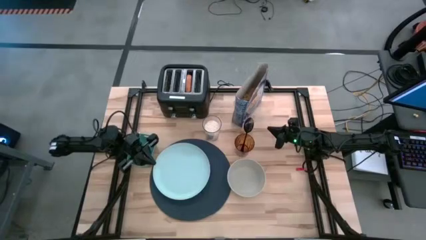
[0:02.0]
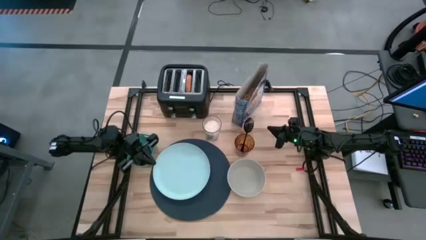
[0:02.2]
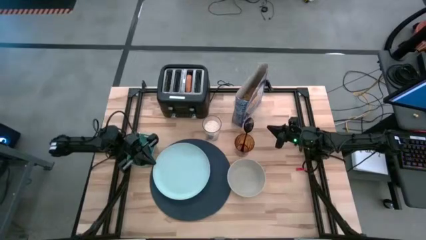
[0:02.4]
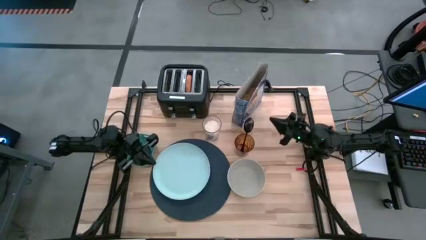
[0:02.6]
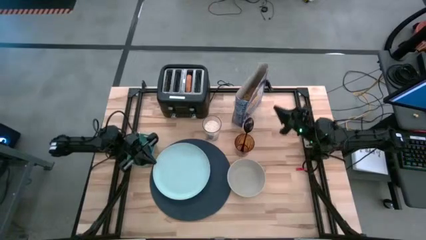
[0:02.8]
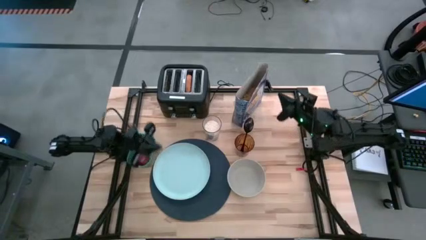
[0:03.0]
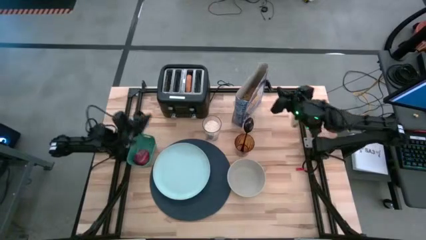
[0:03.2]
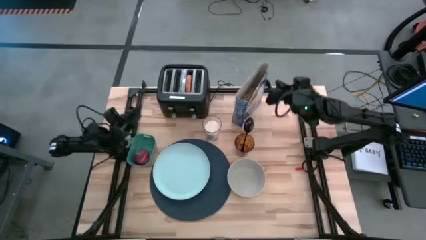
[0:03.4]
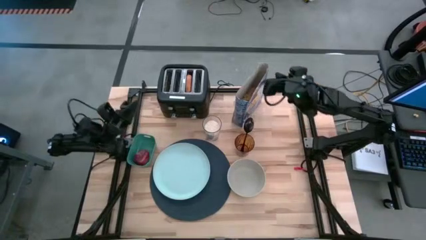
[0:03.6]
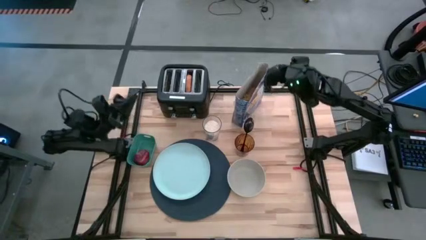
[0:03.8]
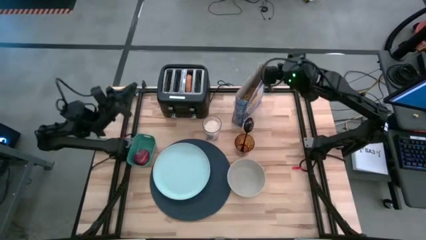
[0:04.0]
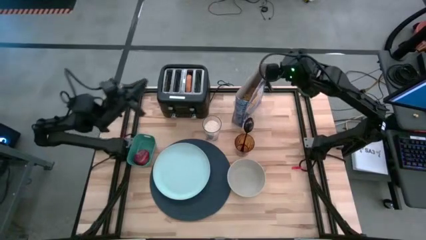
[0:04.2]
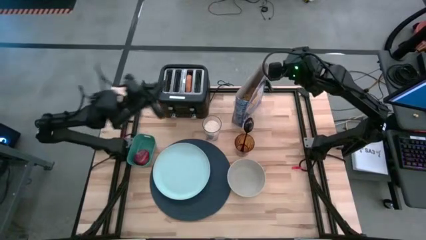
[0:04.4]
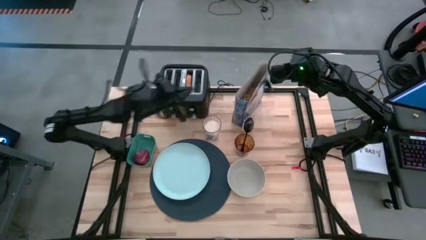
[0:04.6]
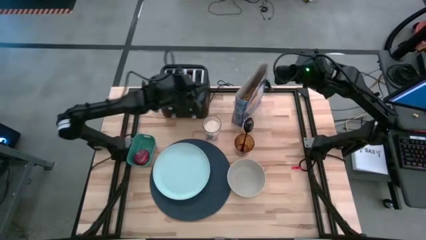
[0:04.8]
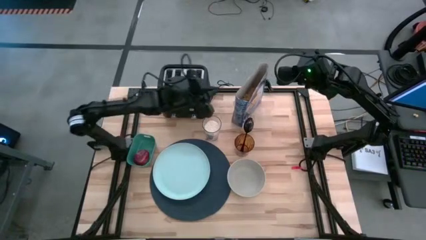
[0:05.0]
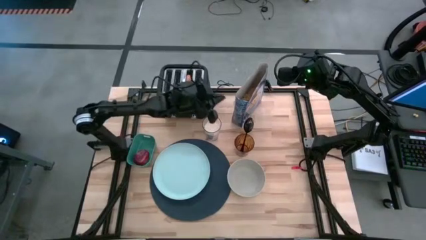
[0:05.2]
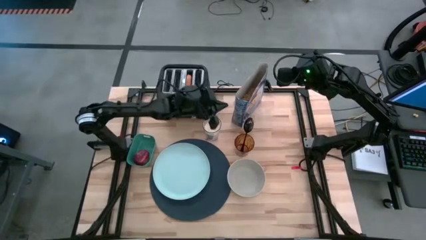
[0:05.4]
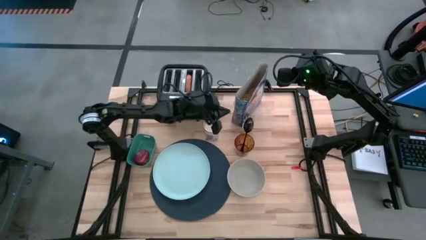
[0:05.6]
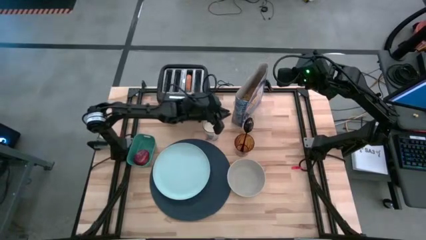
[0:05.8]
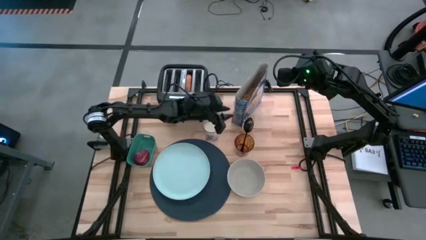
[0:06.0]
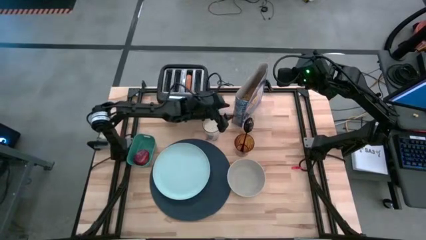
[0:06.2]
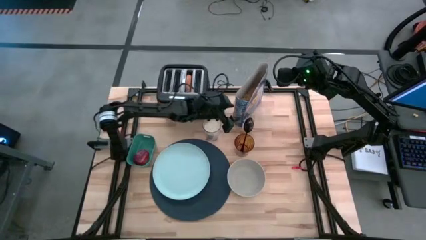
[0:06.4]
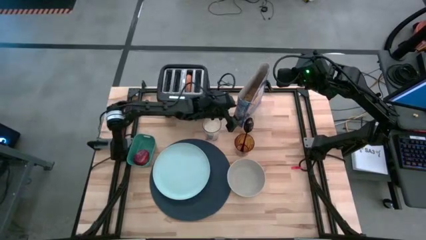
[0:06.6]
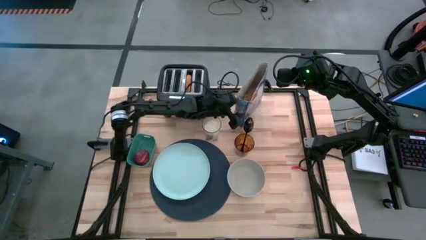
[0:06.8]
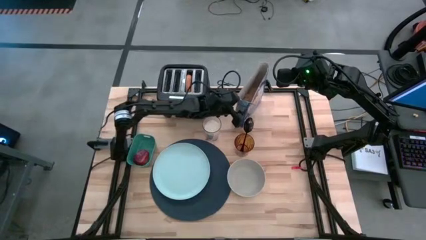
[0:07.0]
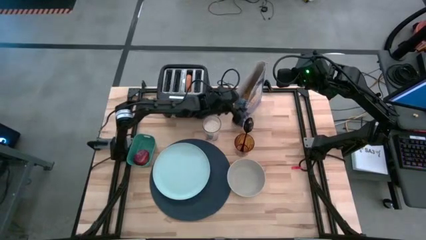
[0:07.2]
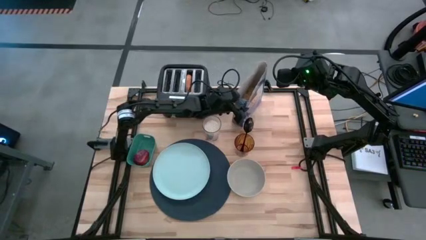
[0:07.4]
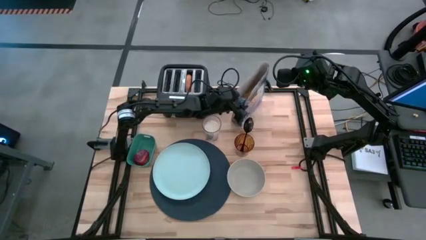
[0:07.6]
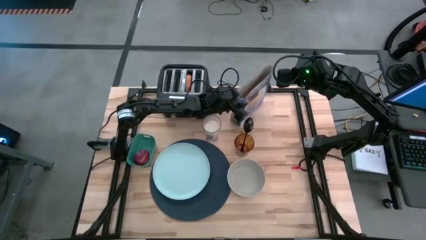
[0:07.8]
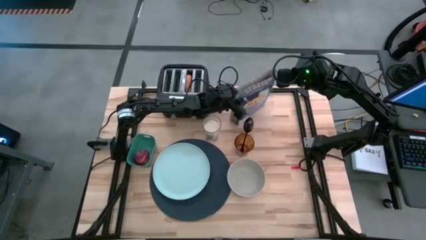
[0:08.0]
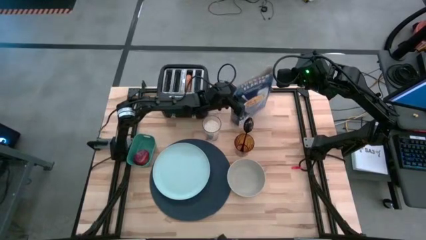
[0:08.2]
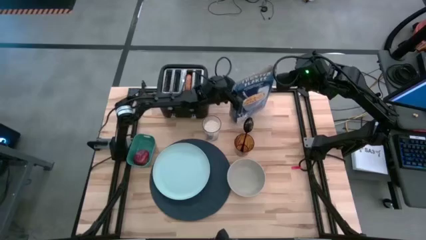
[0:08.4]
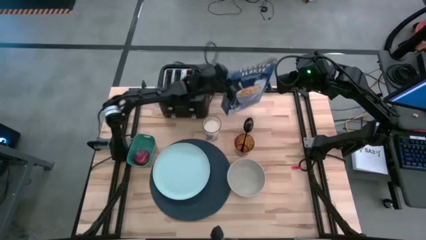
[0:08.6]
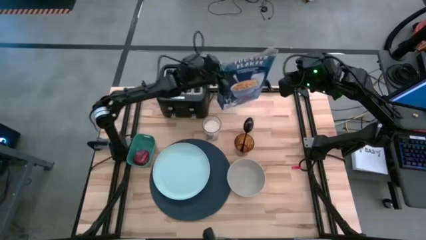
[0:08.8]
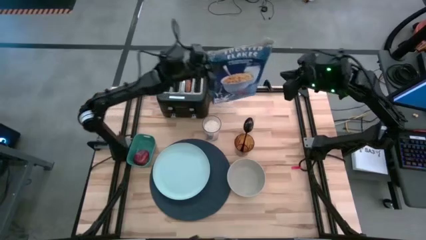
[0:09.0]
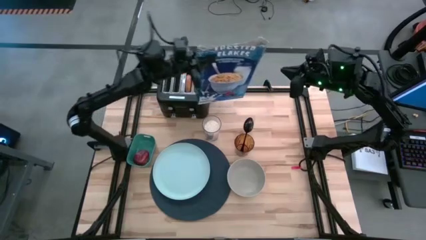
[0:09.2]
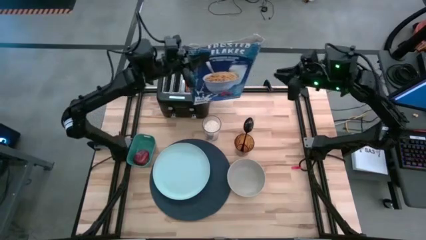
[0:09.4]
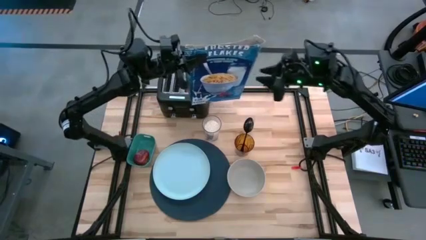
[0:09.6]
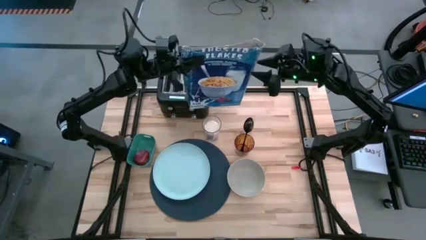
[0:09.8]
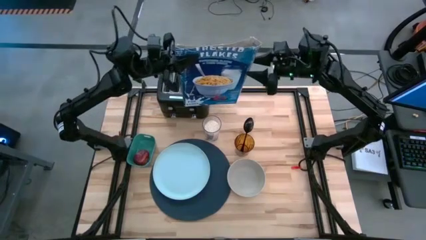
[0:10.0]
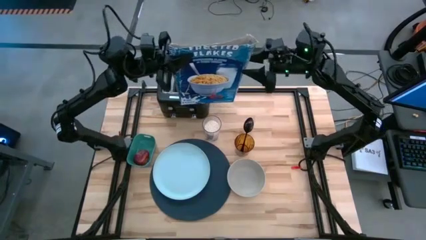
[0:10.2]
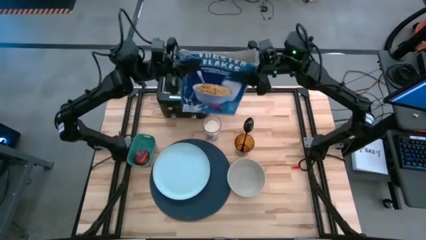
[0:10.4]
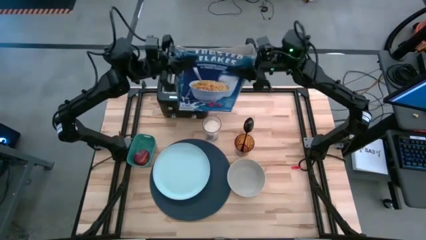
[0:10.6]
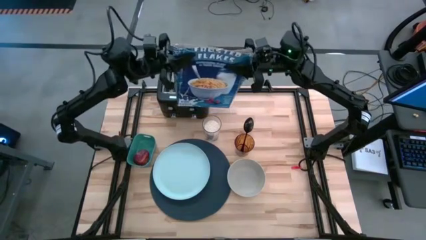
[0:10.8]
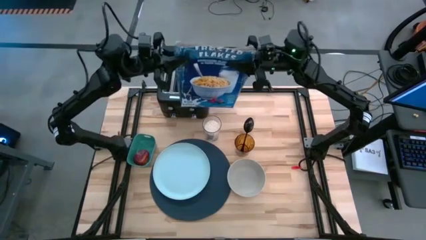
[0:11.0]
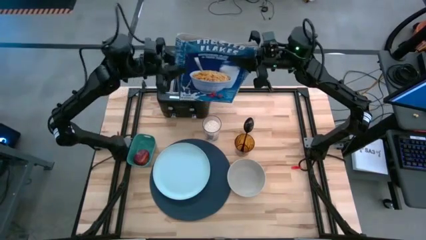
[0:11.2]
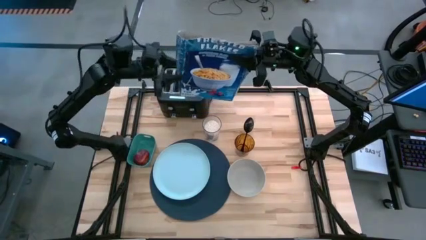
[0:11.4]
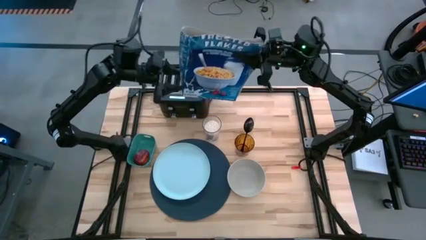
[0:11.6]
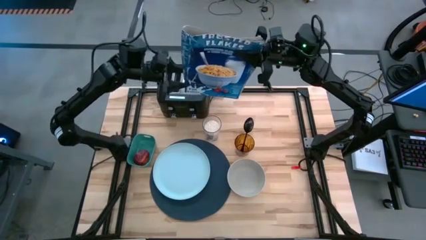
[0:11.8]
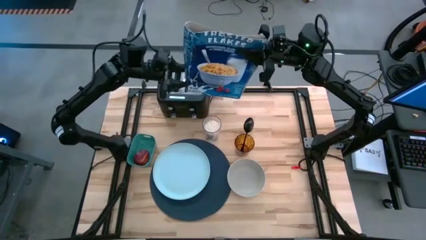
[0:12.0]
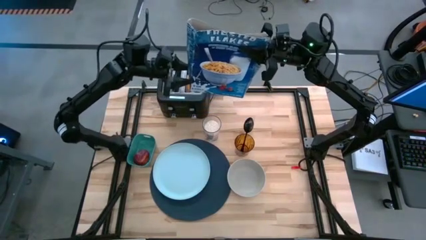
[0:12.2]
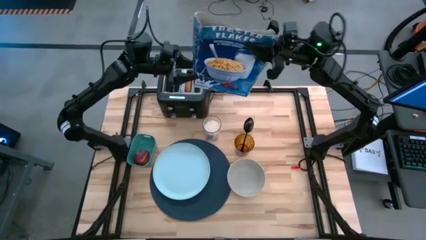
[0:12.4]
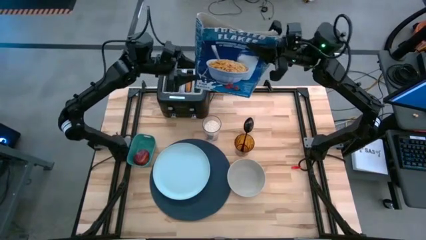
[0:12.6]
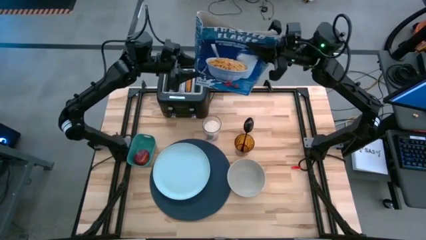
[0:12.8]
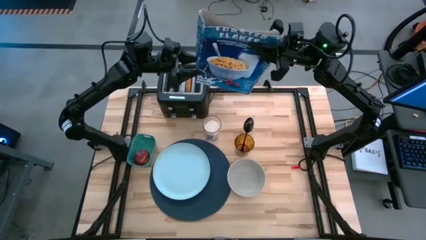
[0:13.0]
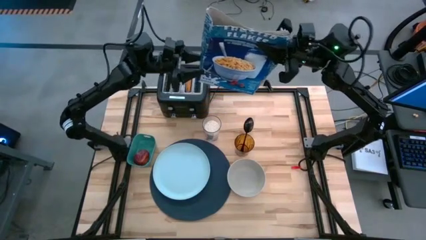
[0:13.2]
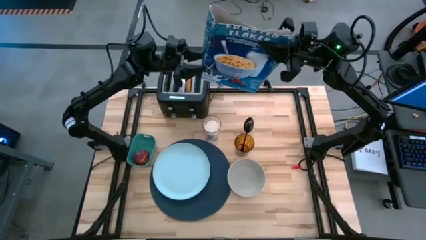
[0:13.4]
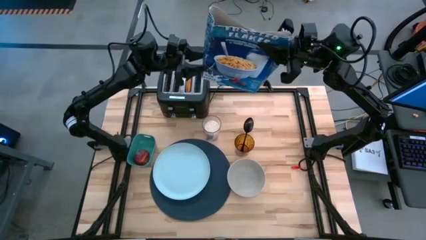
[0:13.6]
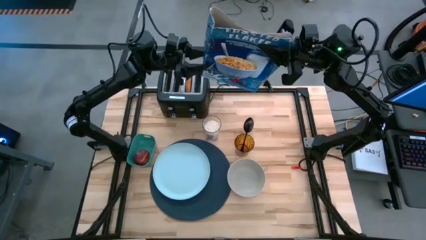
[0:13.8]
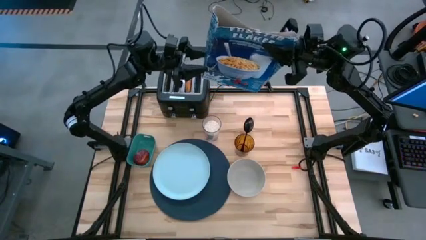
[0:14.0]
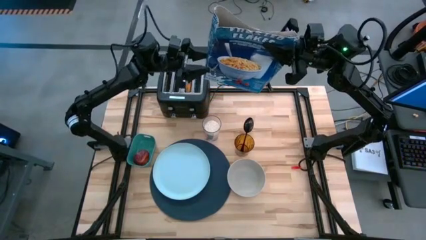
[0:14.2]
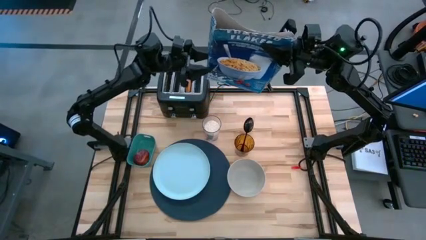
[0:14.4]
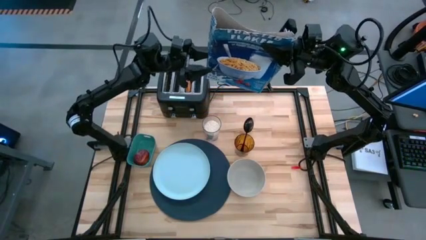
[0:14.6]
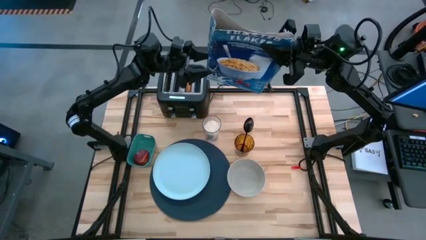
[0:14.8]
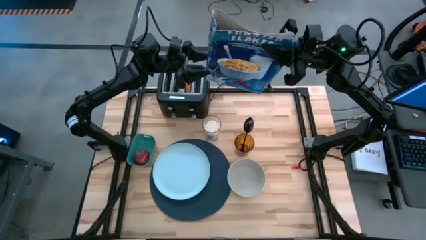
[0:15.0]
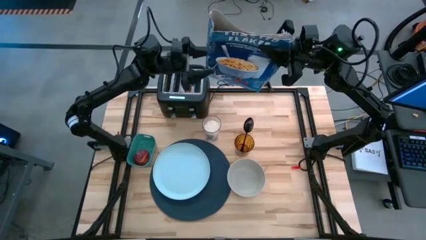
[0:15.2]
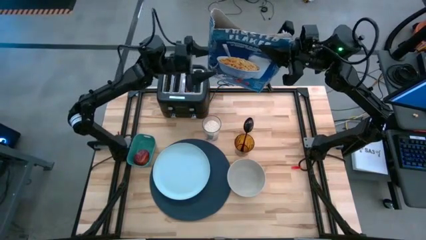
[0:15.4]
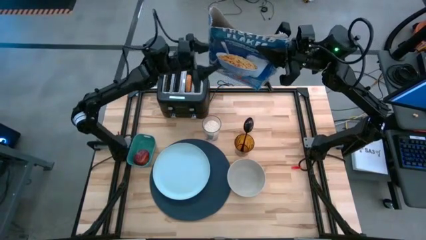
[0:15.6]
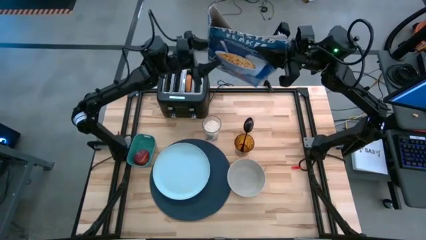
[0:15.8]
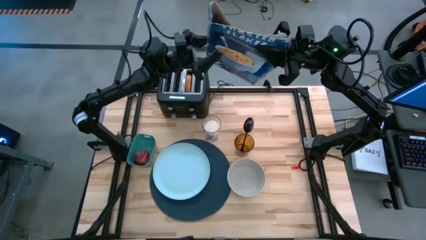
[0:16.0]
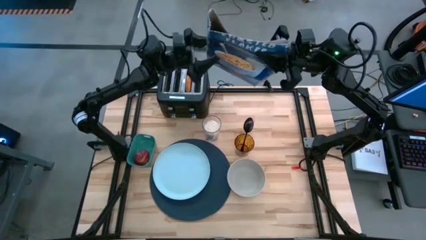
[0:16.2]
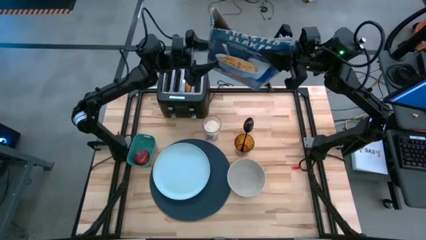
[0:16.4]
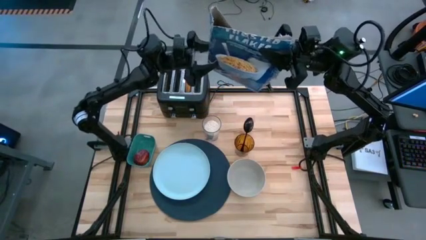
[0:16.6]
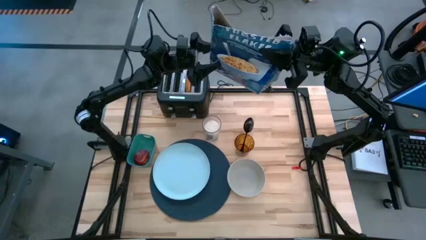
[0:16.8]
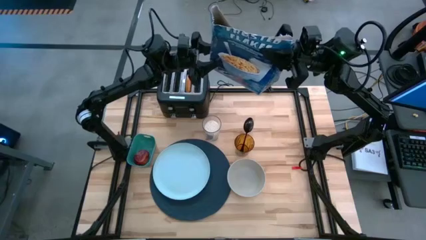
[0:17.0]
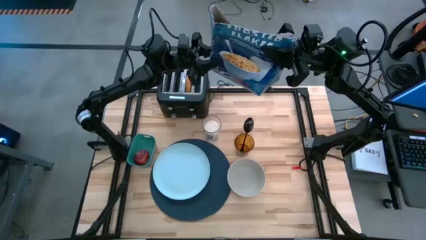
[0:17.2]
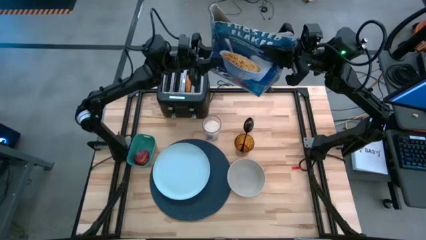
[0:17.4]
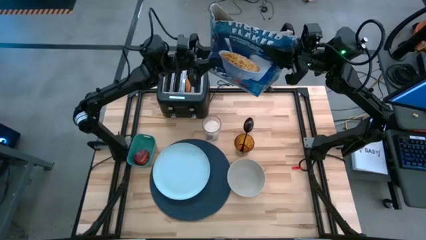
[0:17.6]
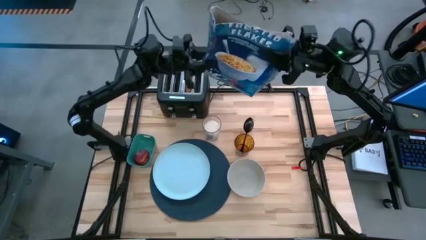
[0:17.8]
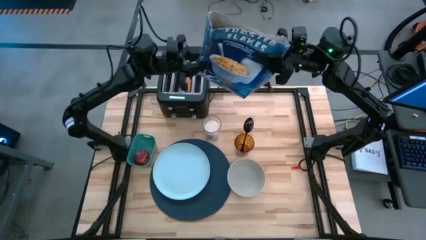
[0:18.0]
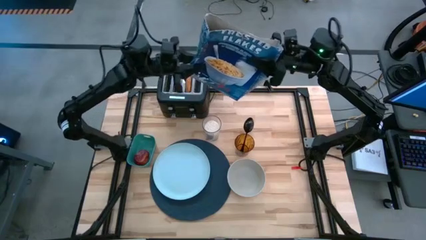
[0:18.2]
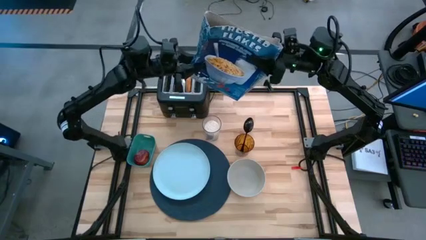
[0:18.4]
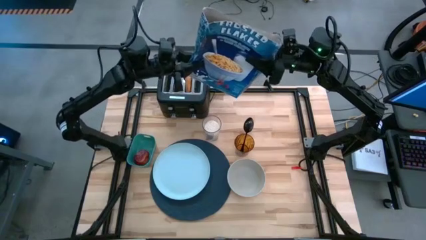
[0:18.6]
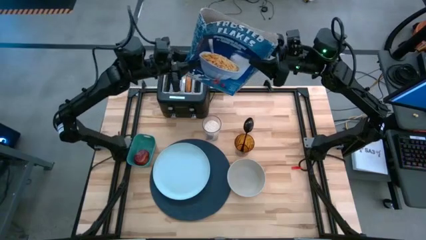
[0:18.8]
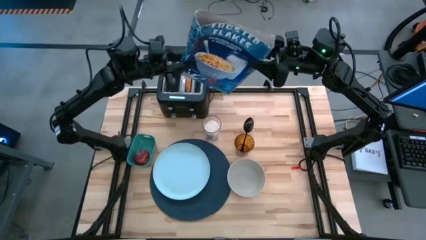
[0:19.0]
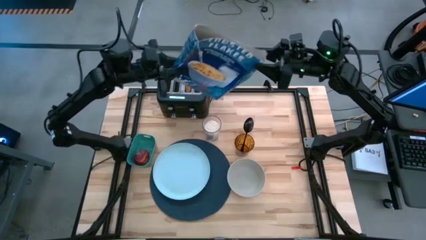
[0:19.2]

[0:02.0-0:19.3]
Task: Arrange a breakfast setting
Pour the cereal into the gray bowl
